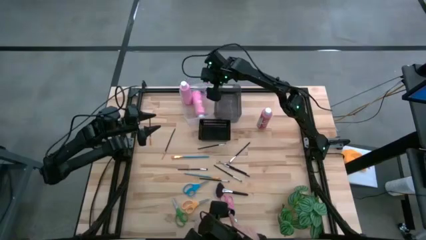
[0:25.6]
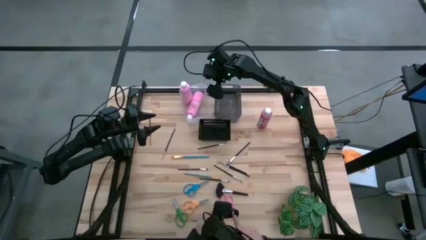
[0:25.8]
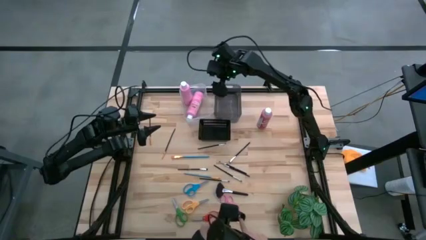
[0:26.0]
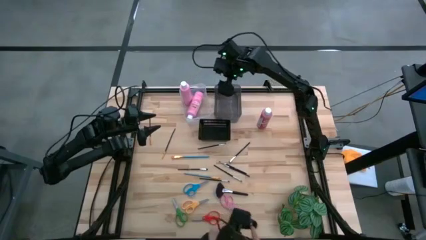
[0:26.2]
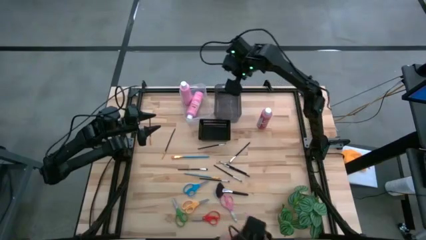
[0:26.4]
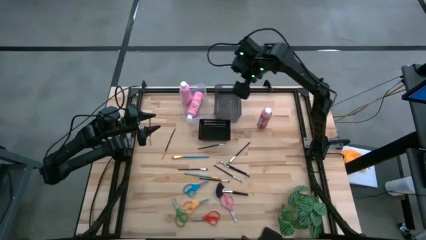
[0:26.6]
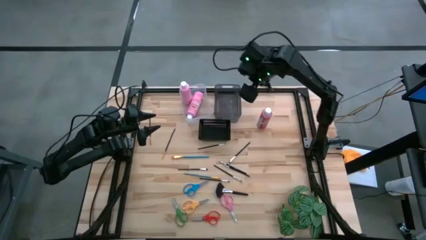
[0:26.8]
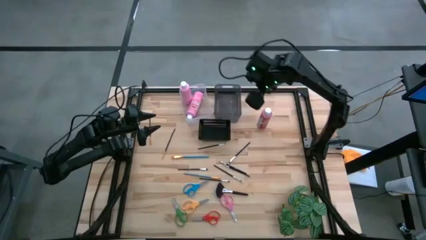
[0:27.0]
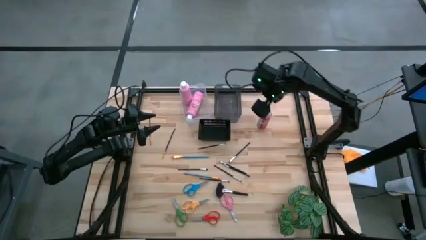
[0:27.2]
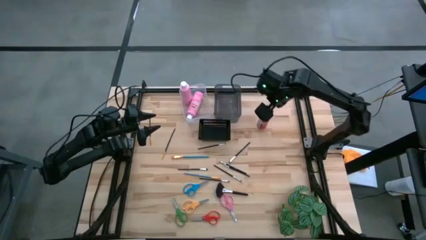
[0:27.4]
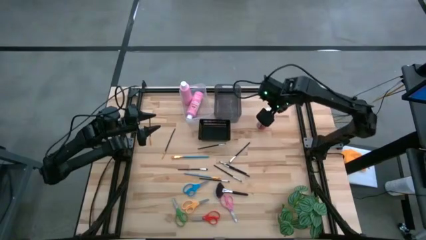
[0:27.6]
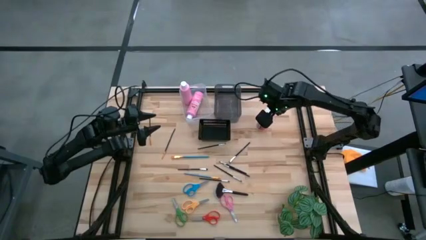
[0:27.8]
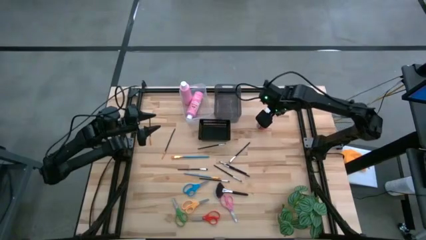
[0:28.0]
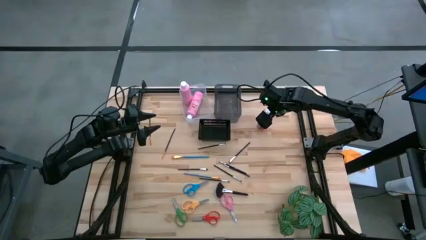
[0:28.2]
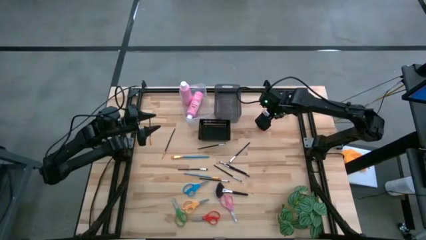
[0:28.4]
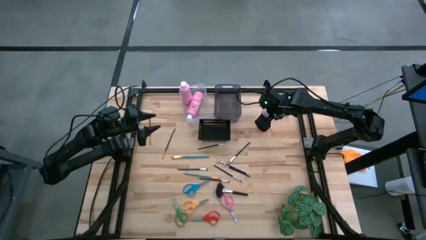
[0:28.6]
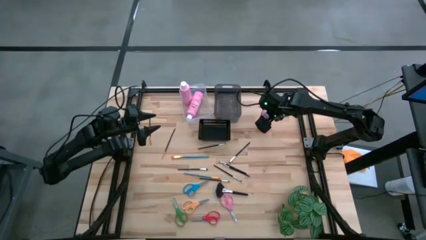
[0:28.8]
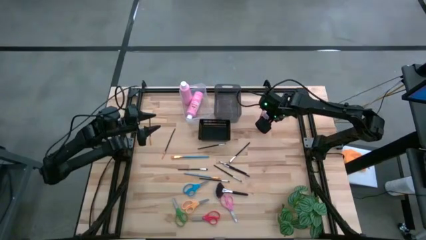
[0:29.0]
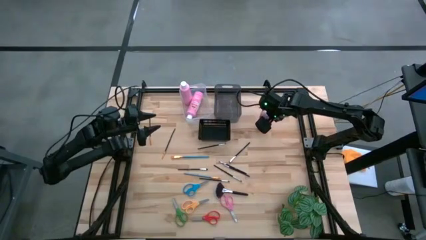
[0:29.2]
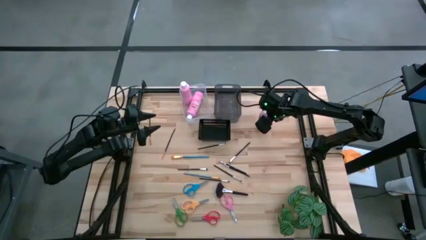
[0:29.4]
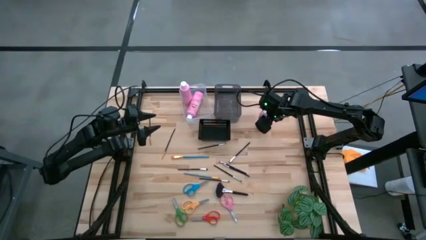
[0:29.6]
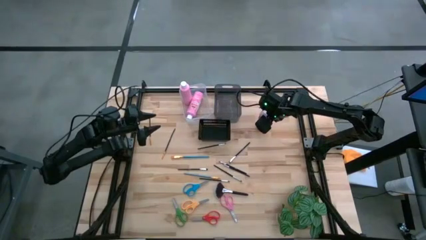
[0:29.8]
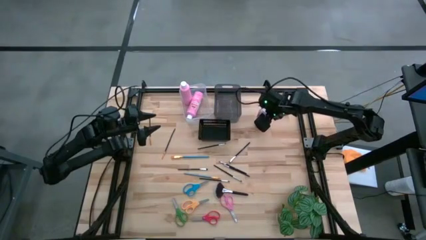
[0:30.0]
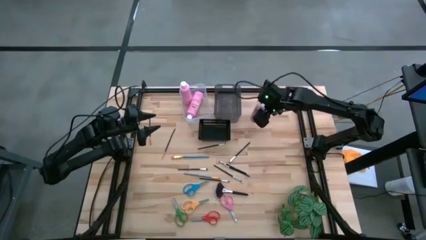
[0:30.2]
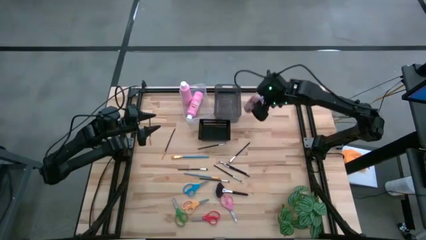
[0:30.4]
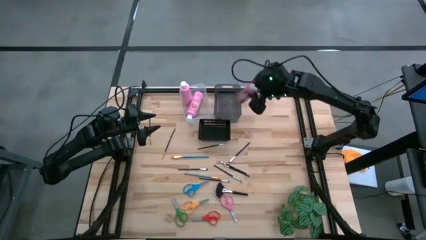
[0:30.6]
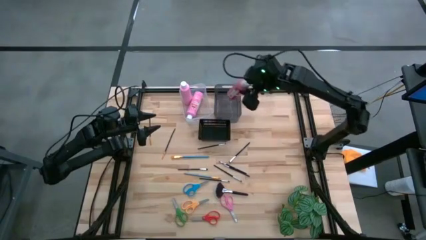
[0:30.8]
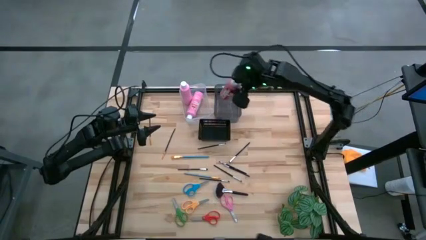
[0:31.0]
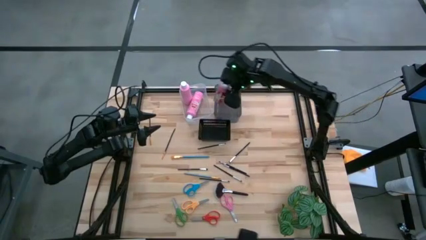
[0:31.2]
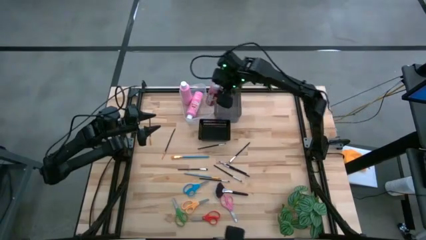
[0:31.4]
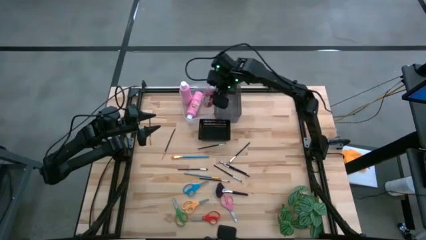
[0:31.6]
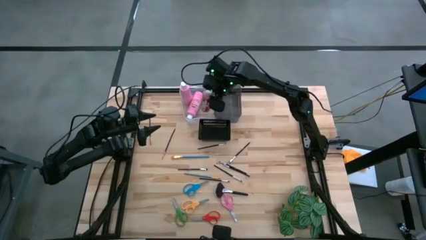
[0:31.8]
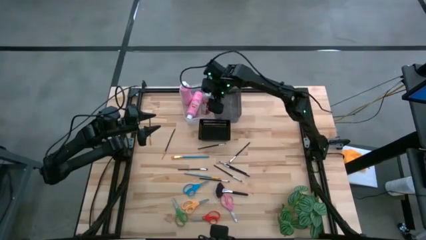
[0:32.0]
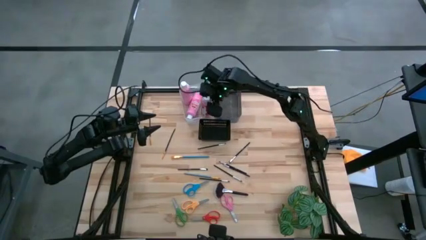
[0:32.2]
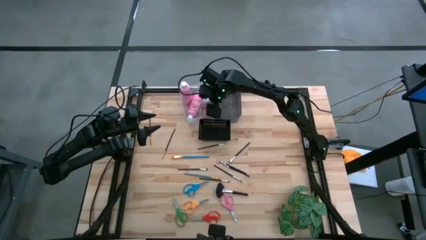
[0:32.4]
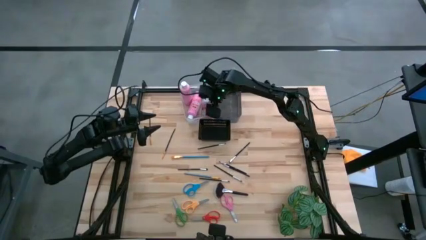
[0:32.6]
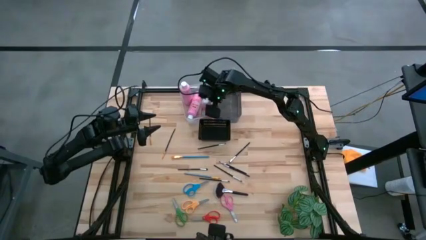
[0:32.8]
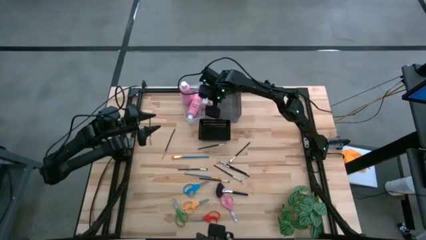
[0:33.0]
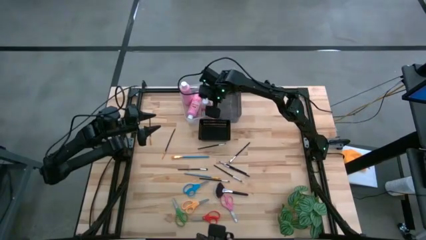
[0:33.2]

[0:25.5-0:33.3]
Task: Pick & Place Paint Supplies
Put the red paint bottle into the transparent bin

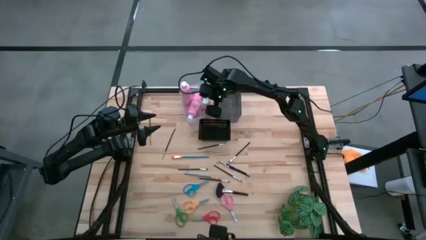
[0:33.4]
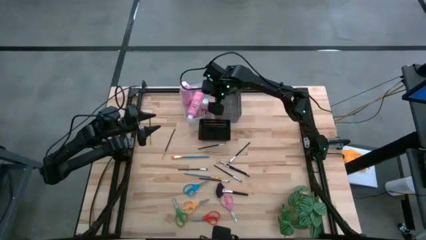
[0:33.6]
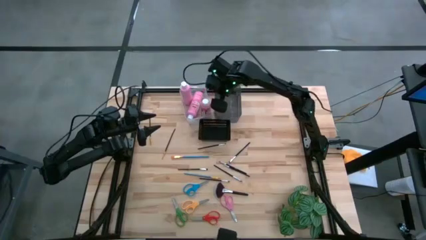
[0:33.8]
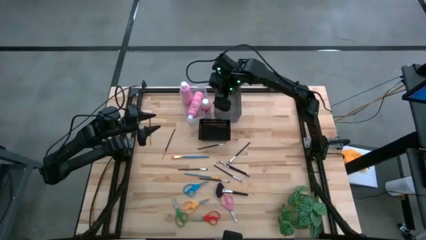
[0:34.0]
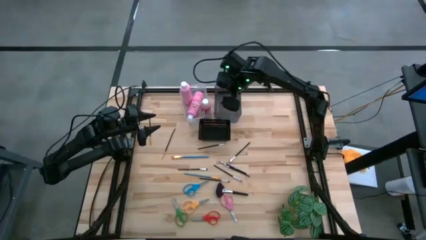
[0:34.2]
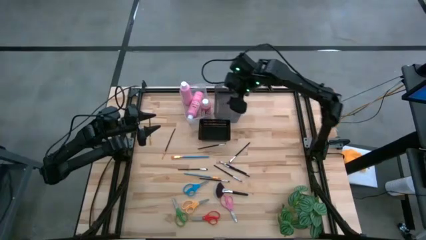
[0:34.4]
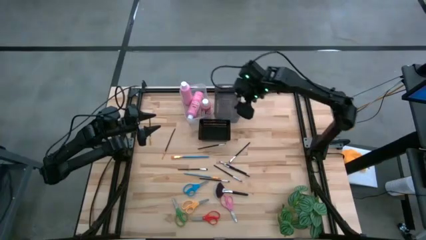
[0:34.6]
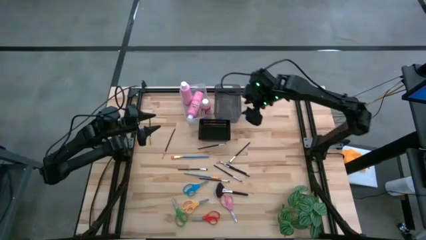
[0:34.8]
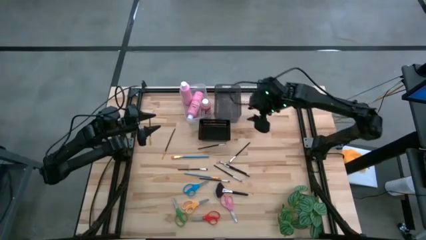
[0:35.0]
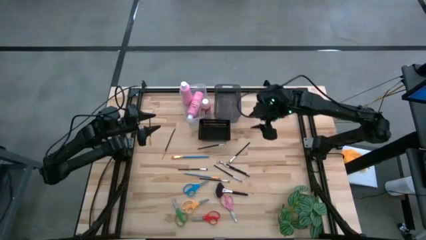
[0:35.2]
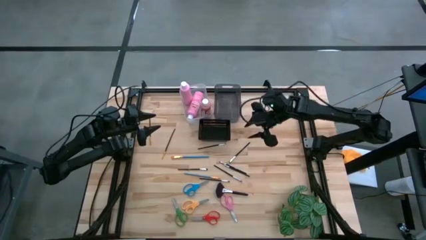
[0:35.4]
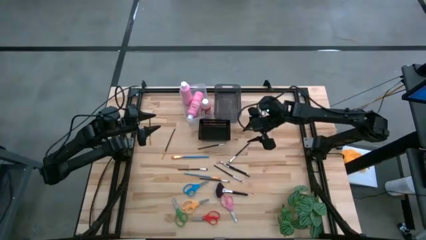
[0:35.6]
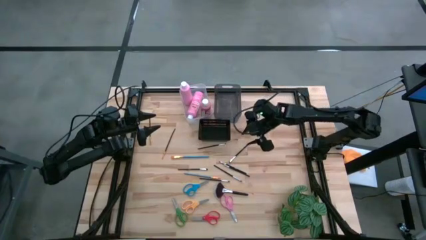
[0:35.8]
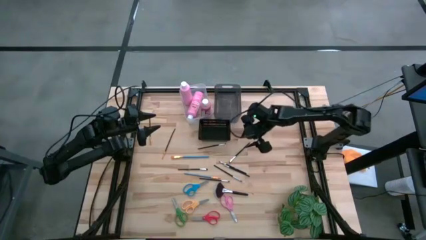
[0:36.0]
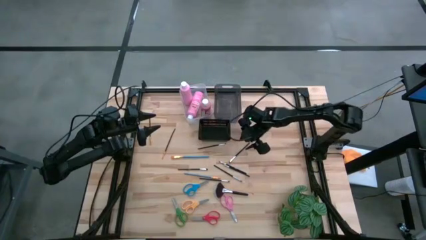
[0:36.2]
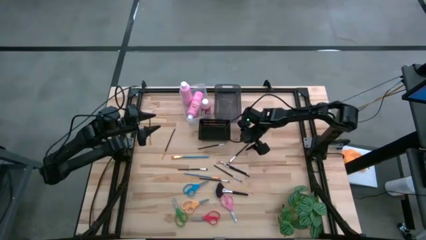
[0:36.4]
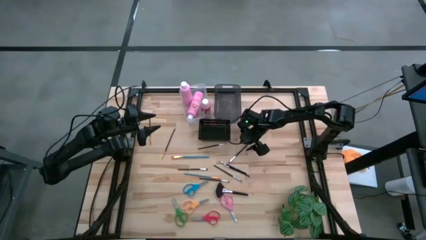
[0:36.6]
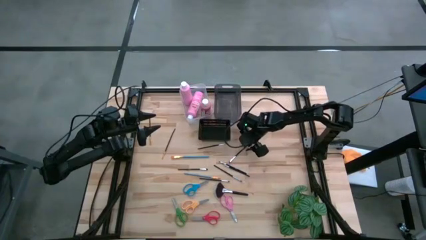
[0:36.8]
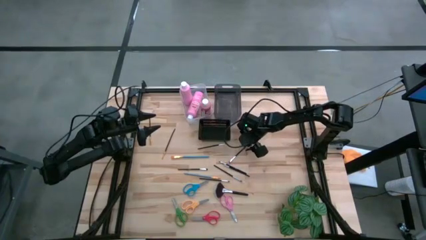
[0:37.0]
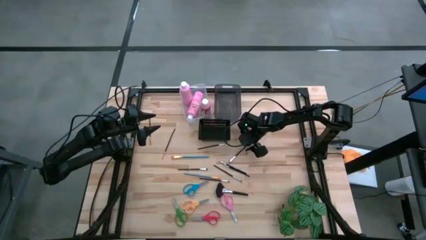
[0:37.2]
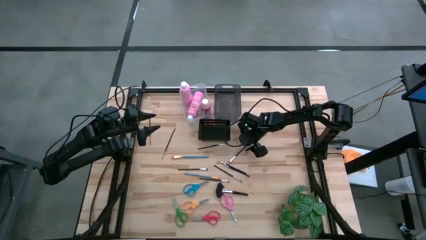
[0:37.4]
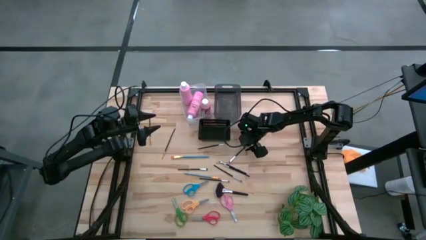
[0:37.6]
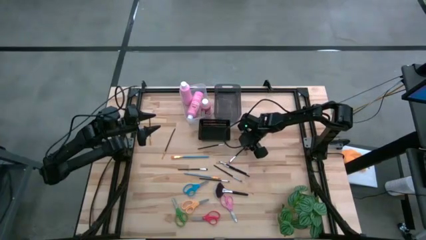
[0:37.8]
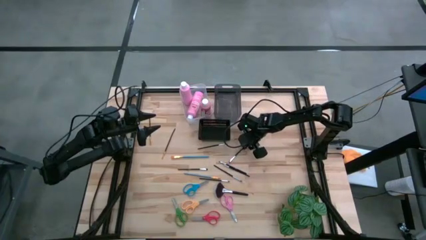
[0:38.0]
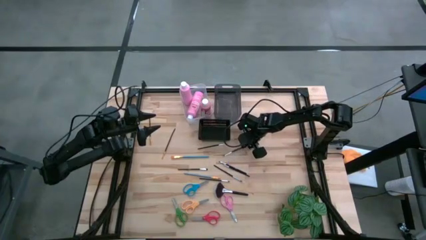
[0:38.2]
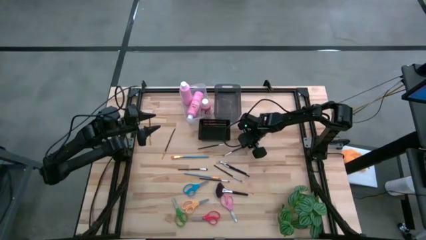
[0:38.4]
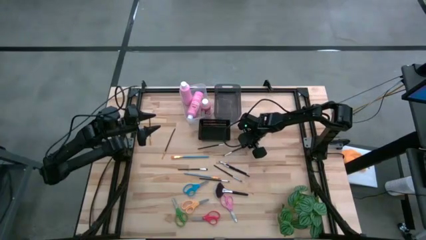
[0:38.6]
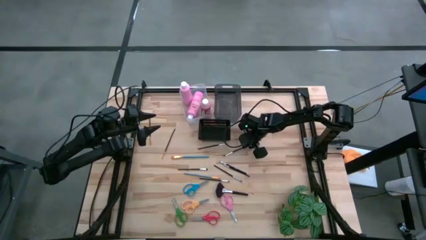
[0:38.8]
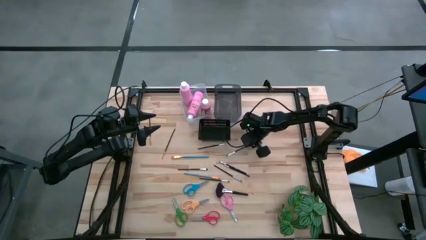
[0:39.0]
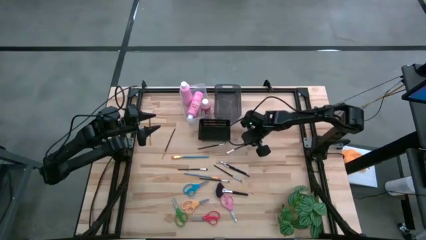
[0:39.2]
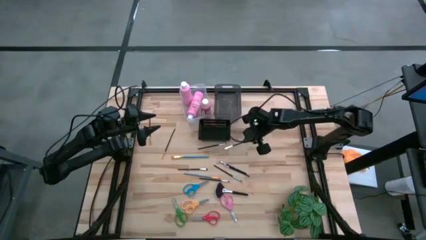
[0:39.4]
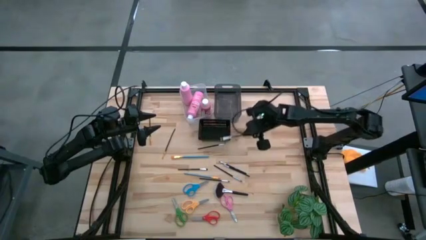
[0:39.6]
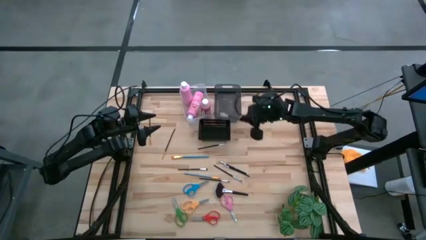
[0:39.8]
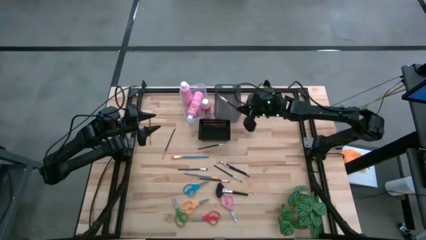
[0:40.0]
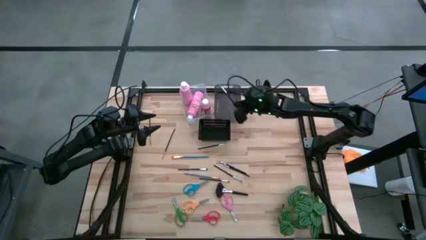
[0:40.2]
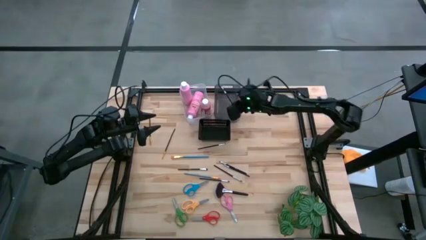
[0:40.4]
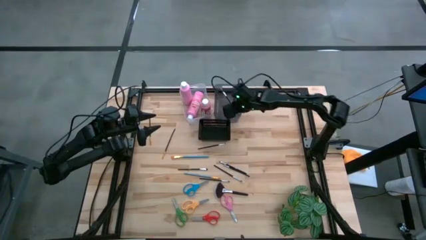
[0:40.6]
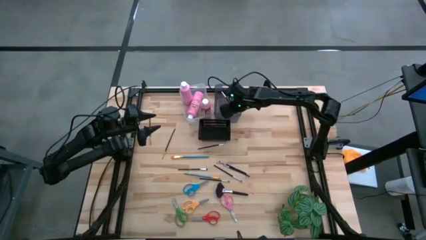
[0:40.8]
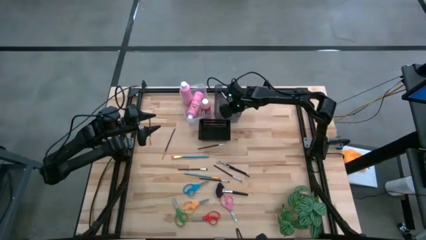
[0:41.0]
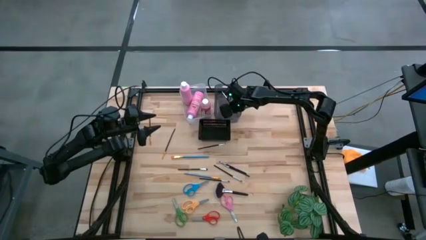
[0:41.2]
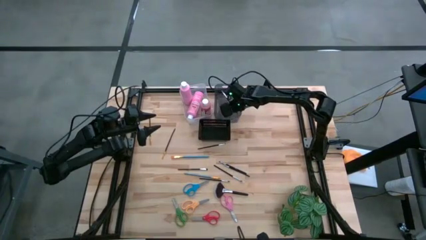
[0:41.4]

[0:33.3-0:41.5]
Put the black paint brush into the gray bin
